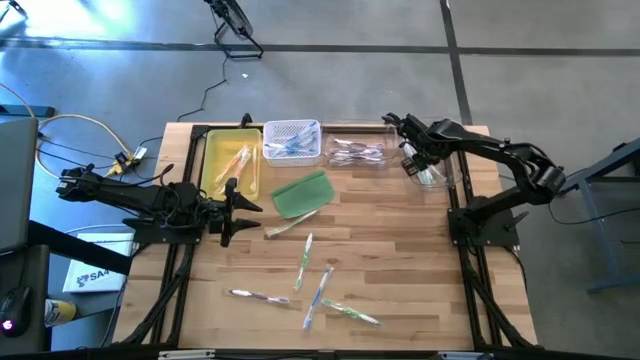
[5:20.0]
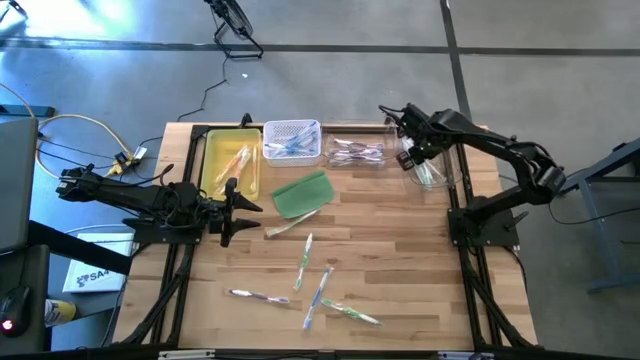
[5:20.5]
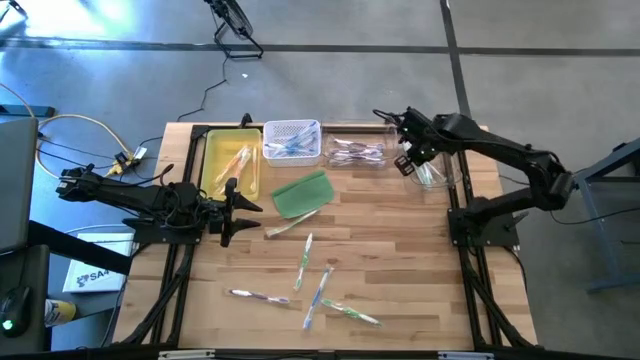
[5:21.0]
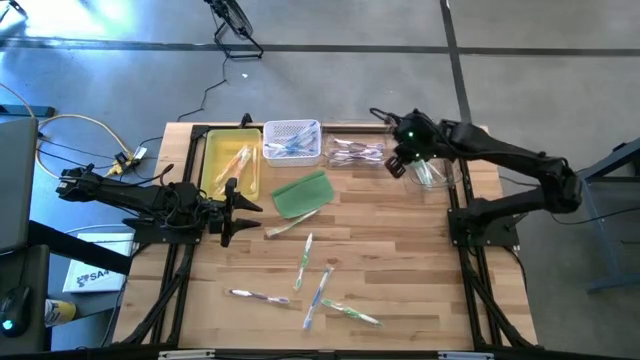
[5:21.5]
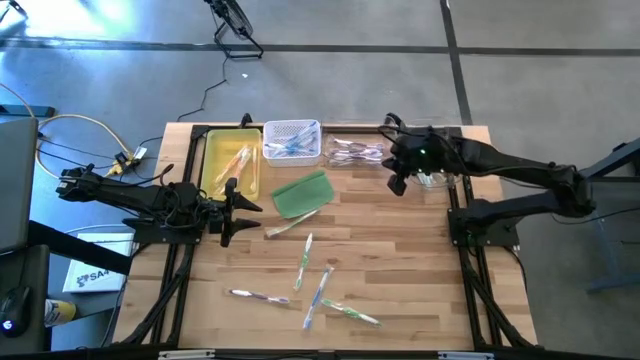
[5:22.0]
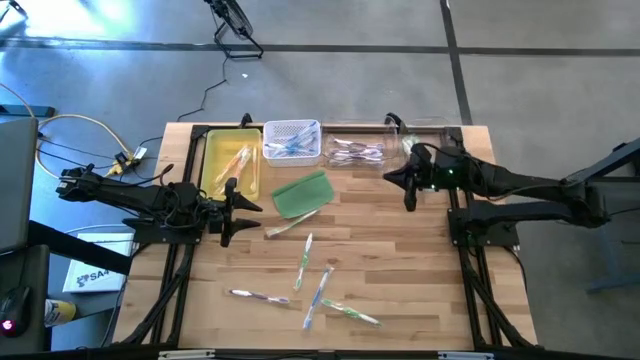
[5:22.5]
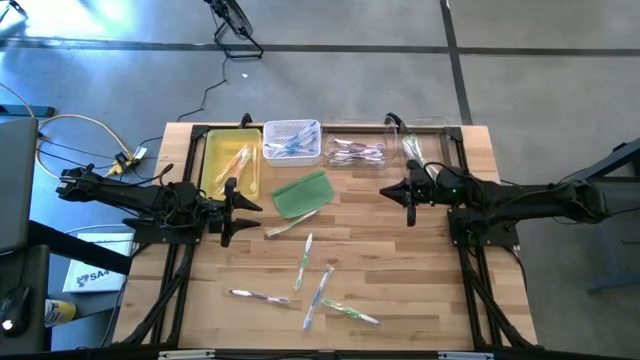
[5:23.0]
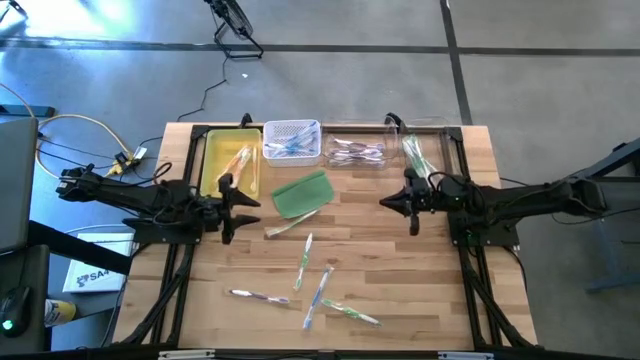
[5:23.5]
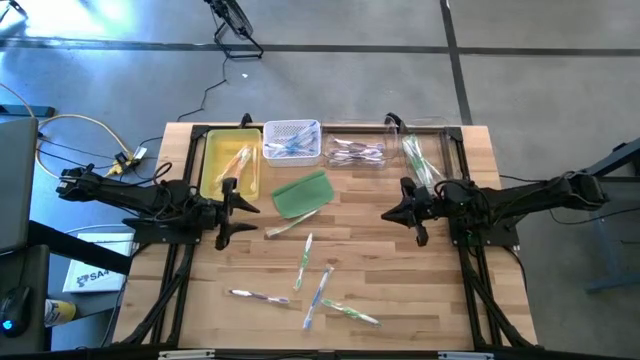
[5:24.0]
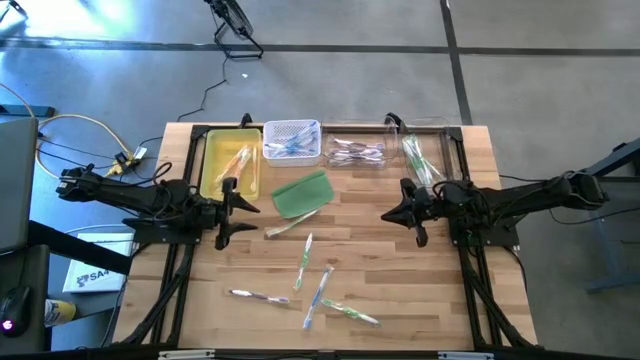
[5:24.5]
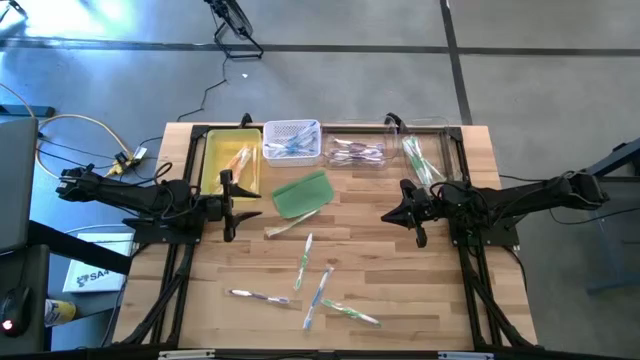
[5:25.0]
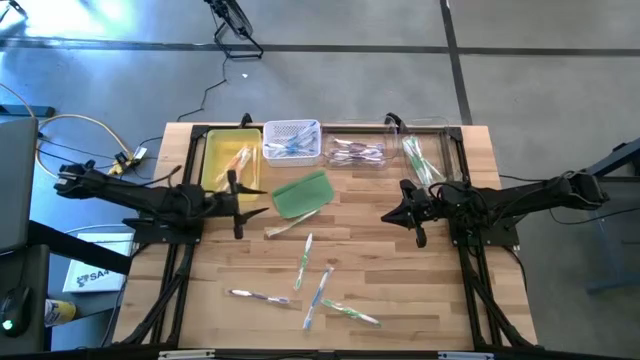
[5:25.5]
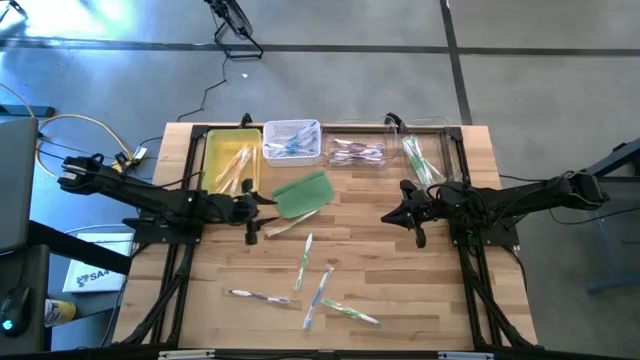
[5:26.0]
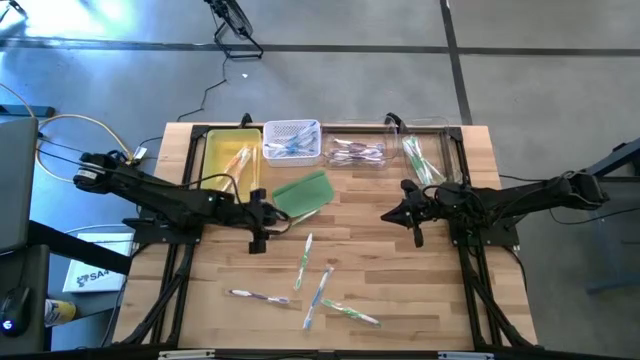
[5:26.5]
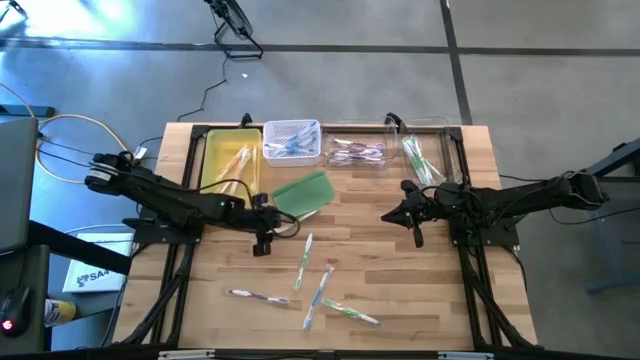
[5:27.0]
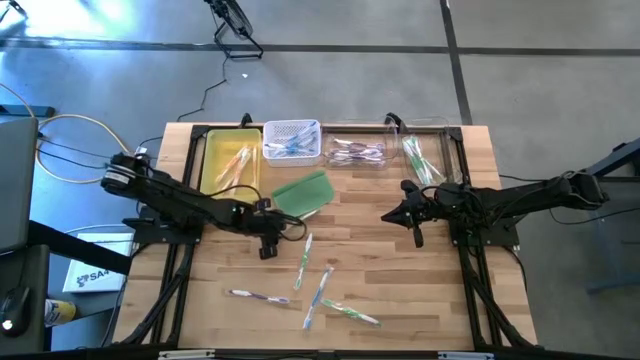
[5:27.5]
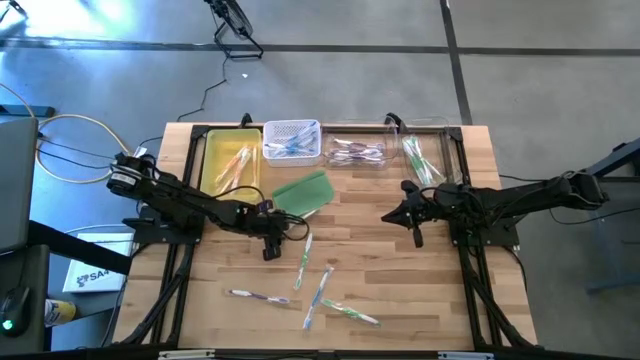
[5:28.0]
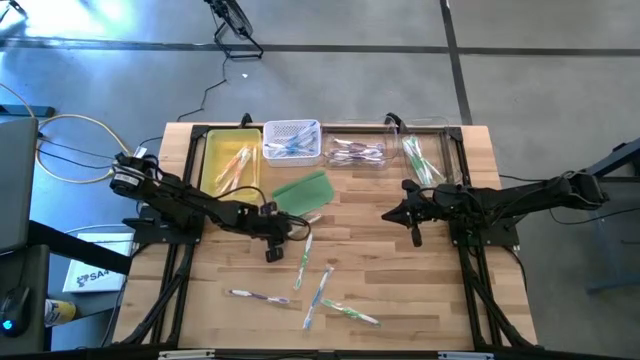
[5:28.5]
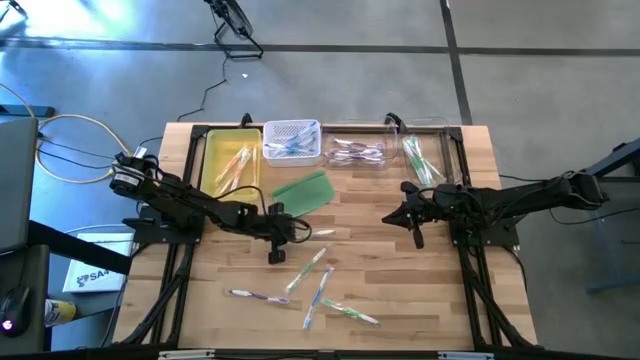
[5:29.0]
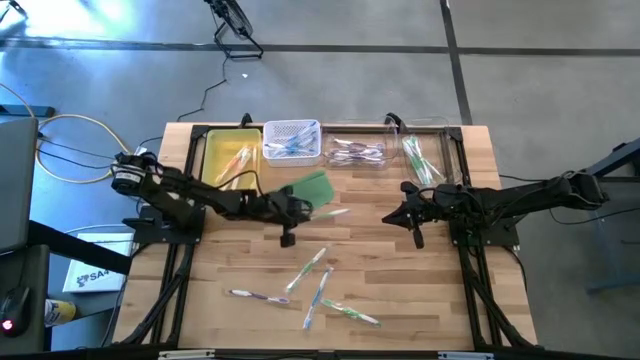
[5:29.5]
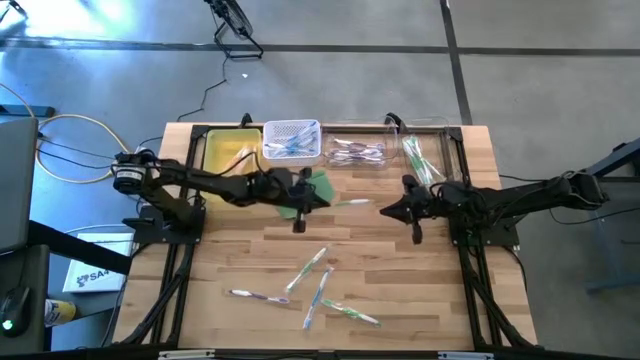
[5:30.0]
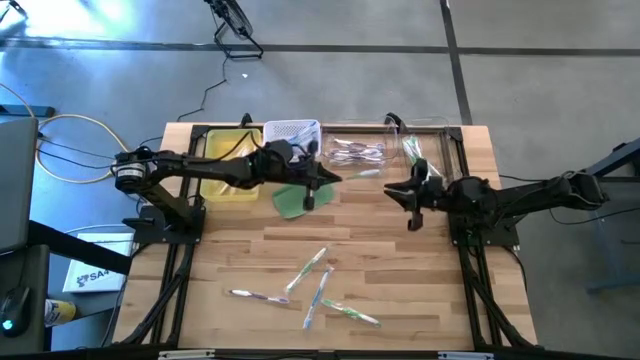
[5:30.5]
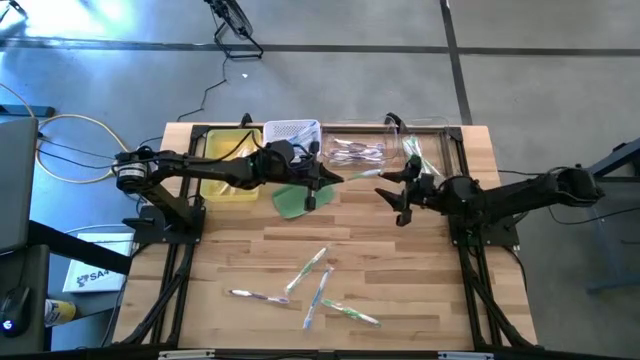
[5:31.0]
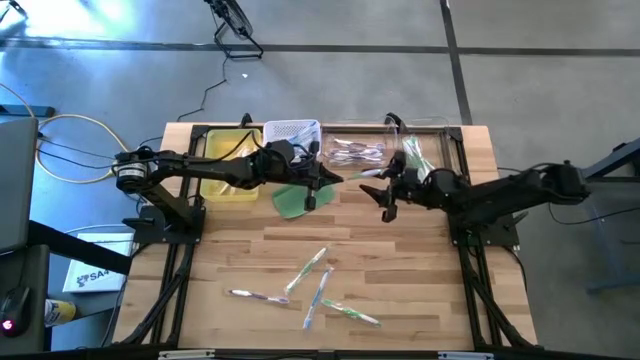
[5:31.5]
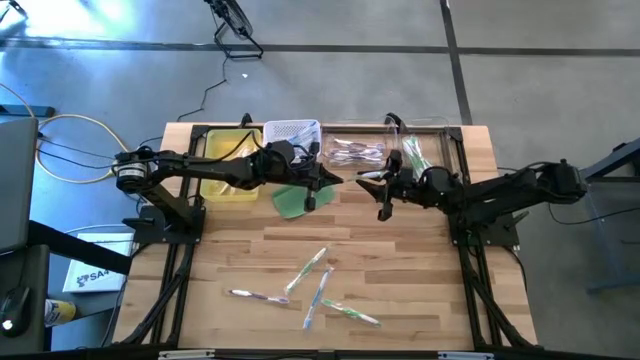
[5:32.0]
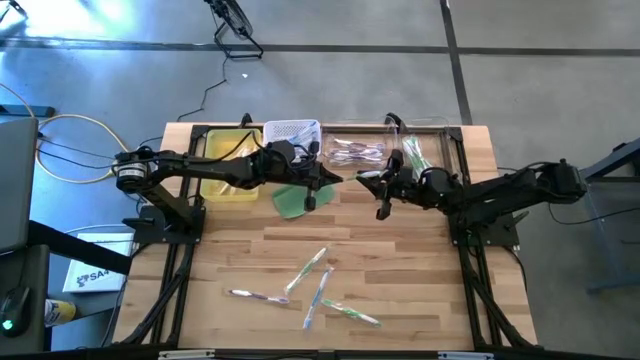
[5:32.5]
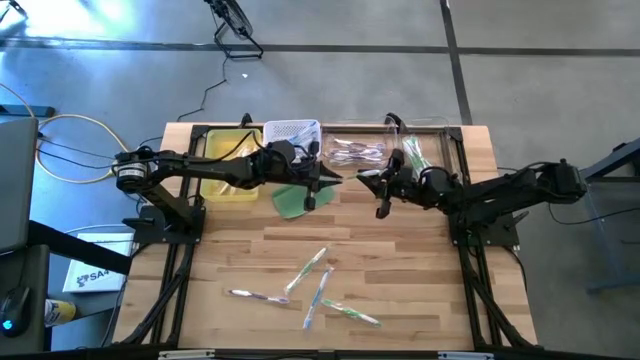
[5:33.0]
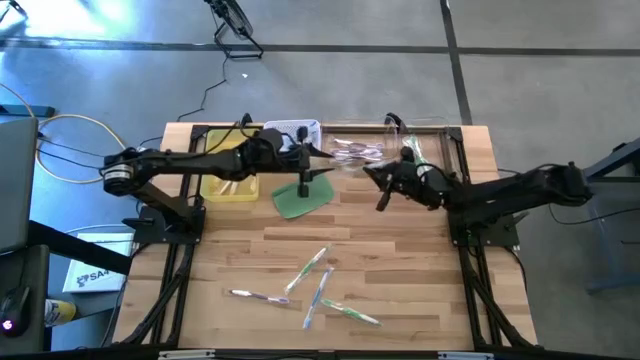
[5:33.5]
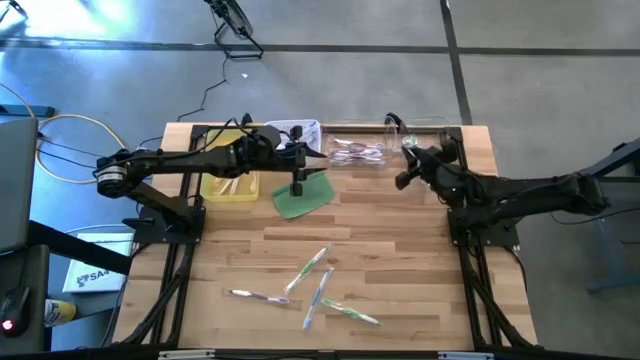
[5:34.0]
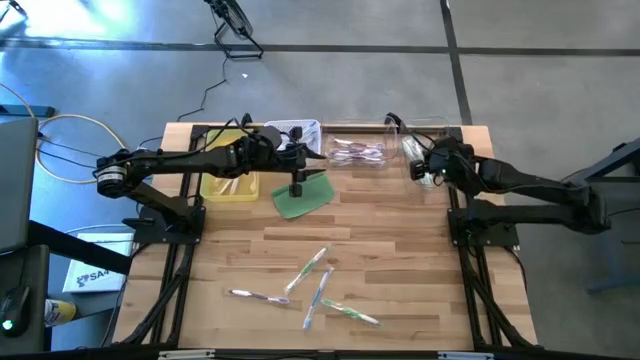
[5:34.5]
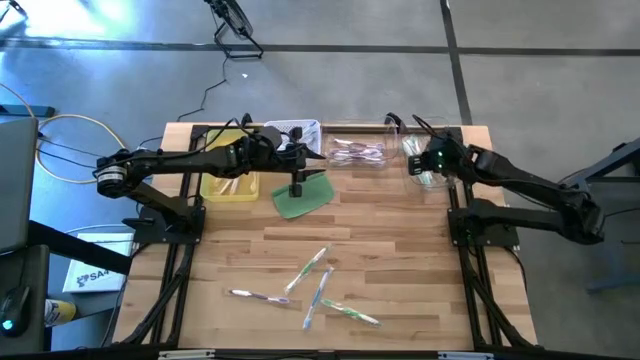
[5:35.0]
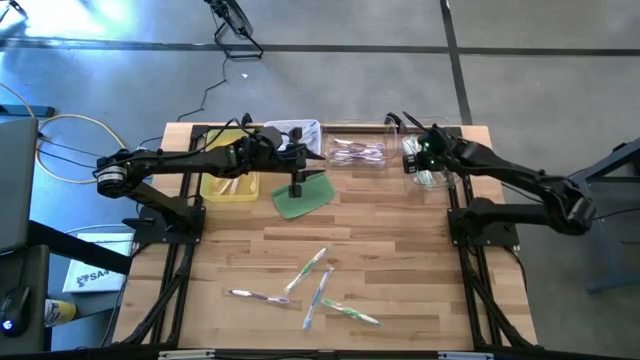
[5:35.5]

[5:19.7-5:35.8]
Task: Pick & Place Toothbrushes
Put the green toothbrush into the right transparent bin

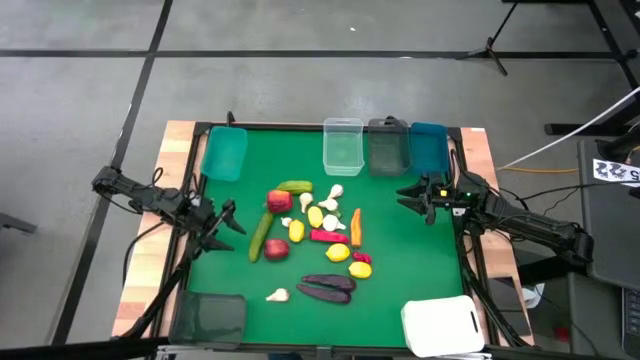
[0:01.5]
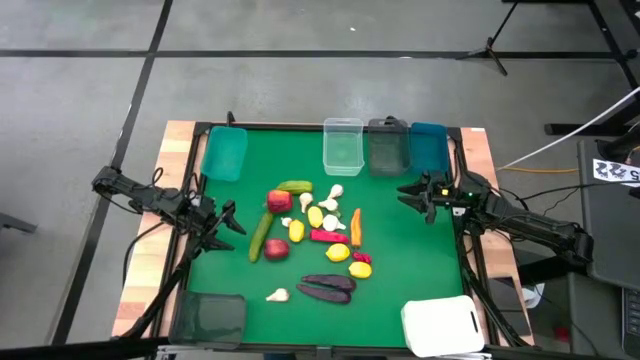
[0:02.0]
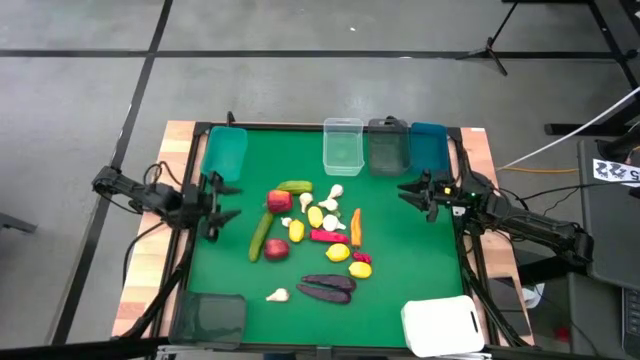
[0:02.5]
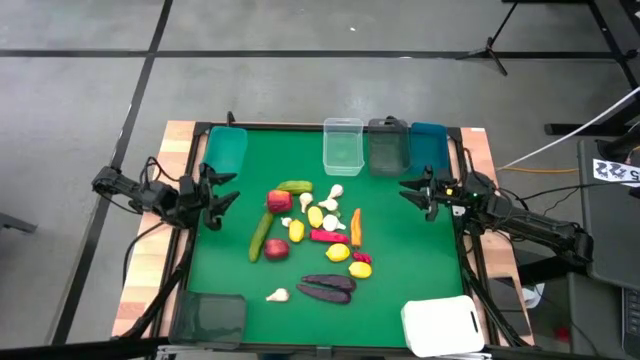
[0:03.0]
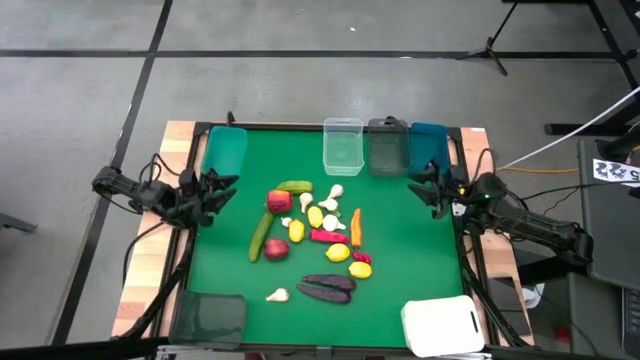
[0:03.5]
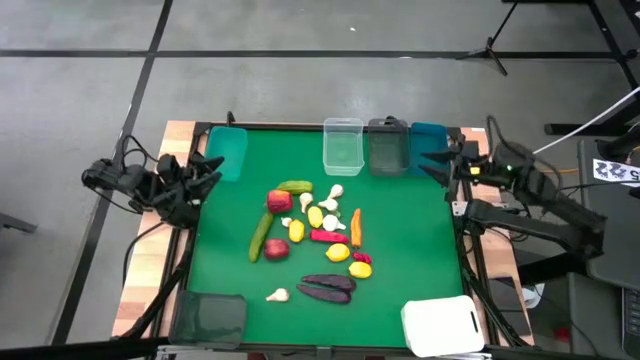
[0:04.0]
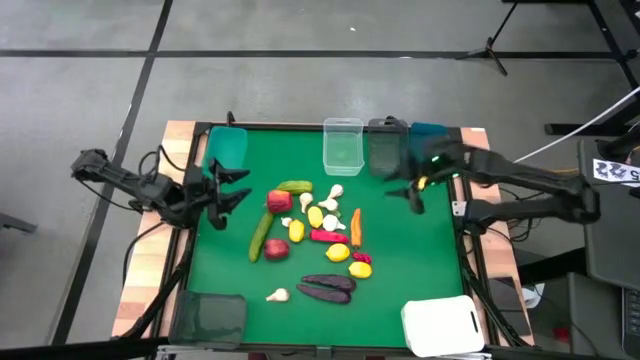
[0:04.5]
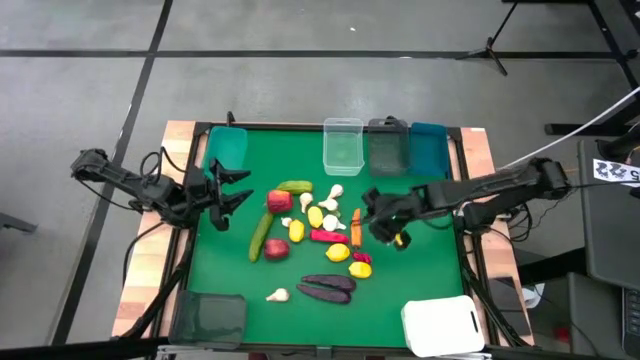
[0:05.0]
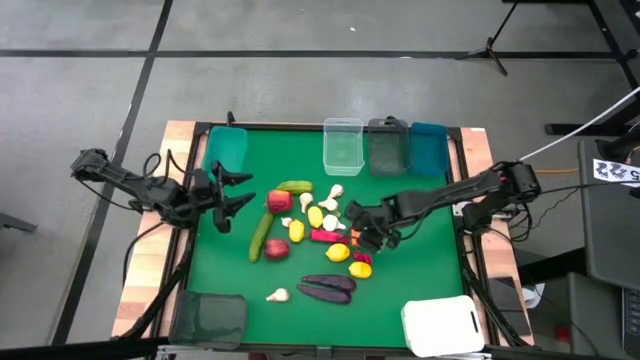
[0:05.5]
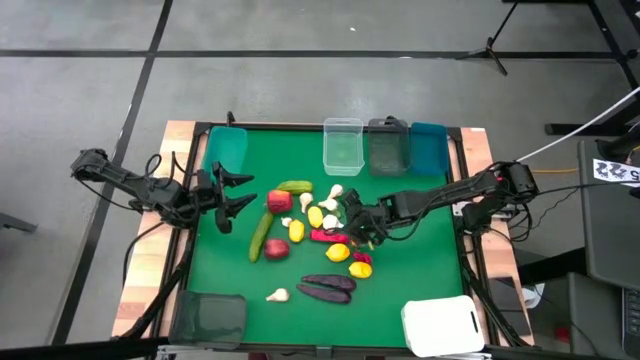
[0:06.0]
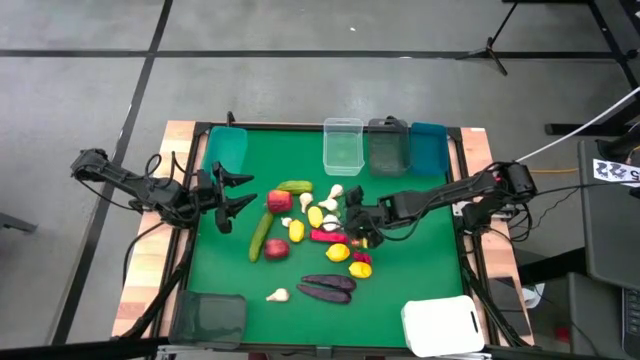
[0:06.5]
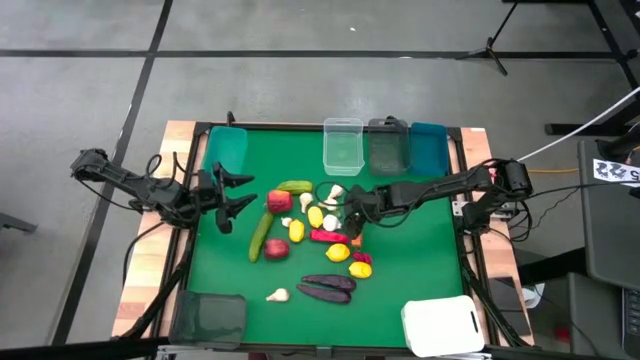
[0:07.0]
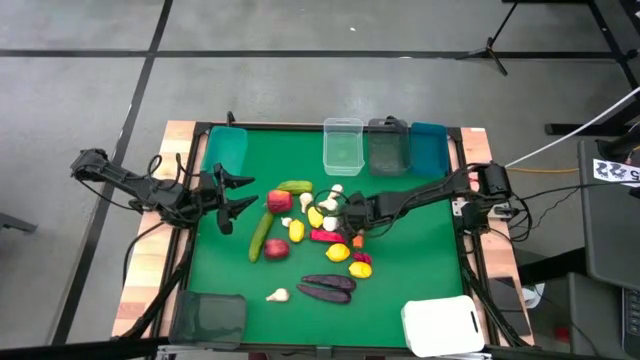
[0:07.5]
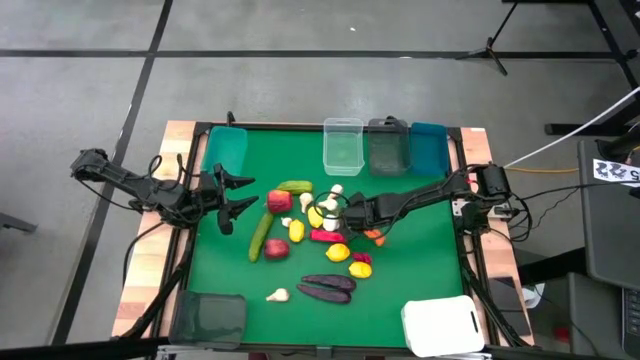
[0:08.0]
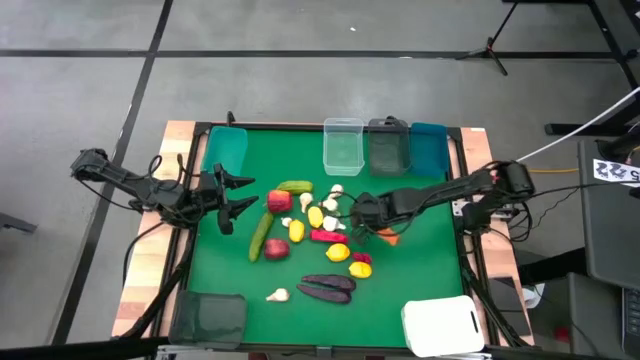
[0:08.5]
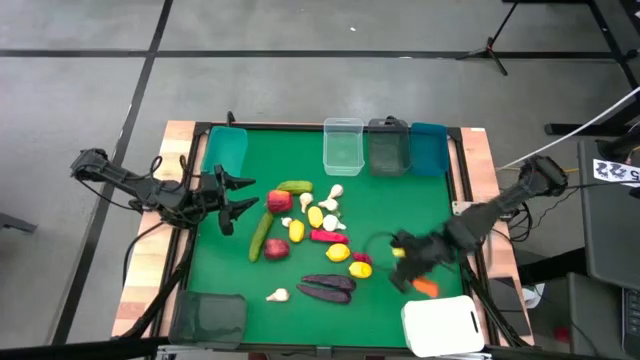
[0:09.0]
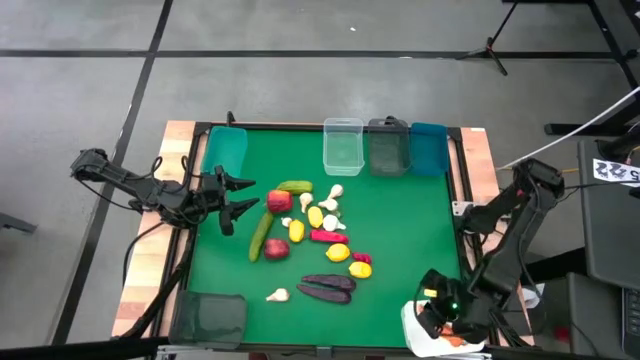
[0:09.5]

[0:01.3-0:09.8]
Task: Sort produce into baskets
Put the orange chili pepper into the white bin
